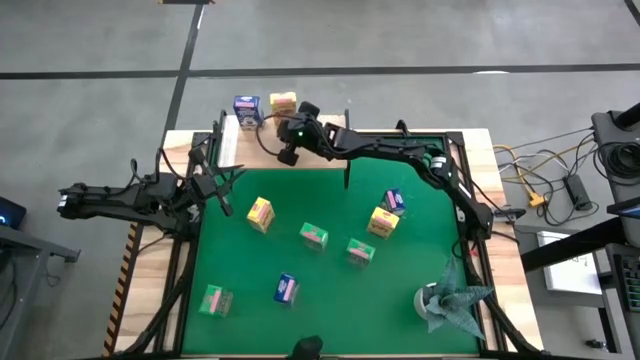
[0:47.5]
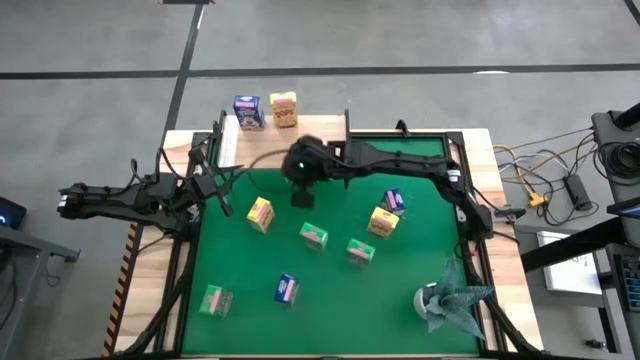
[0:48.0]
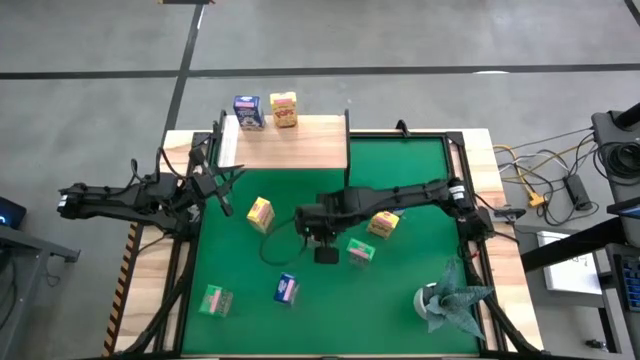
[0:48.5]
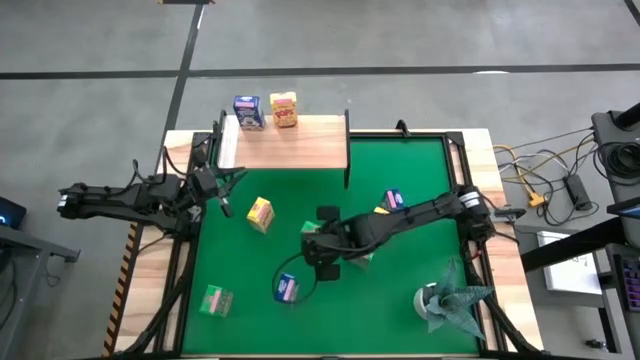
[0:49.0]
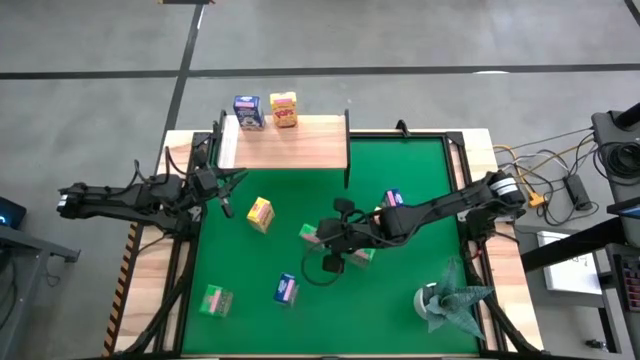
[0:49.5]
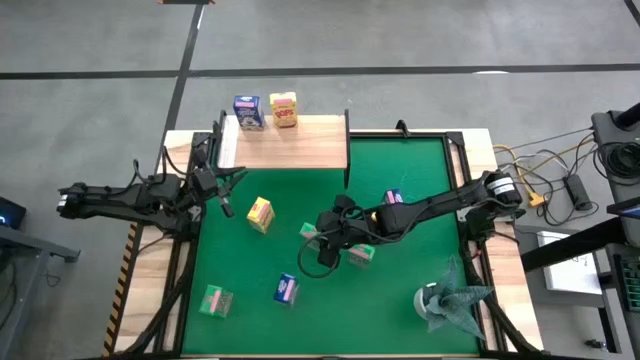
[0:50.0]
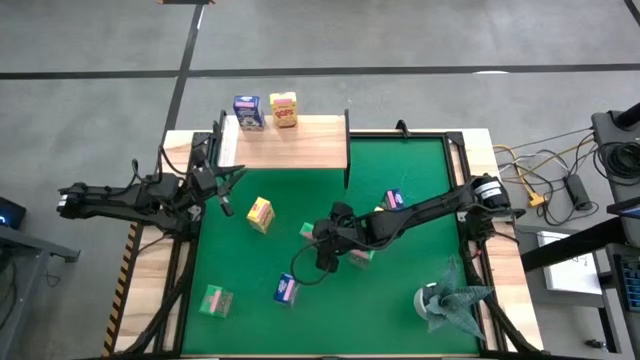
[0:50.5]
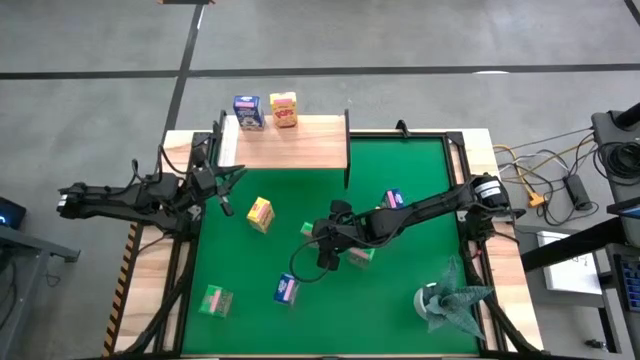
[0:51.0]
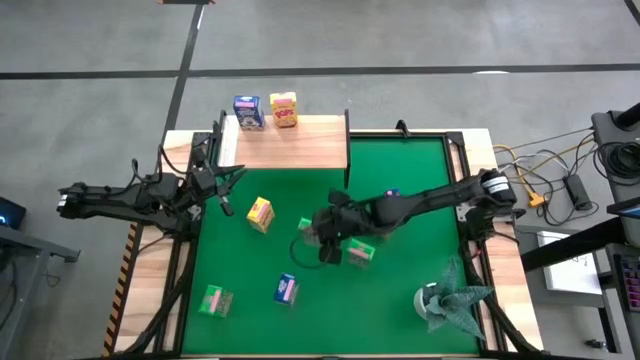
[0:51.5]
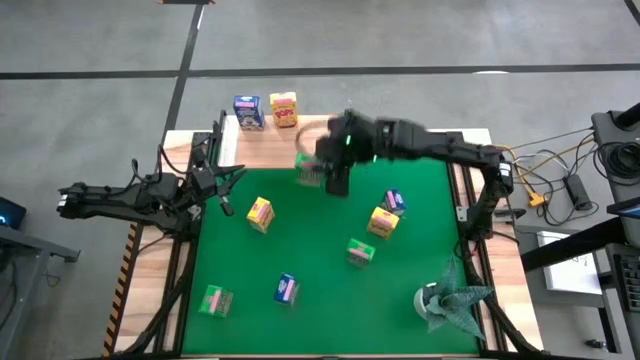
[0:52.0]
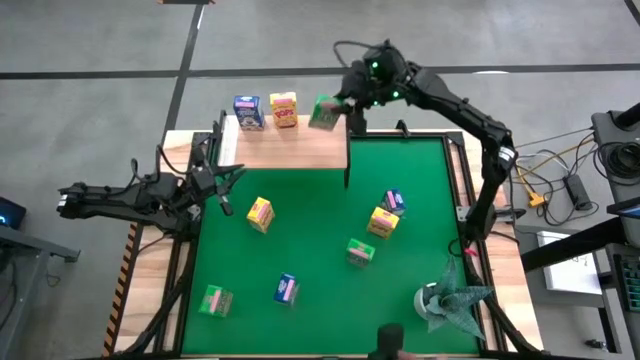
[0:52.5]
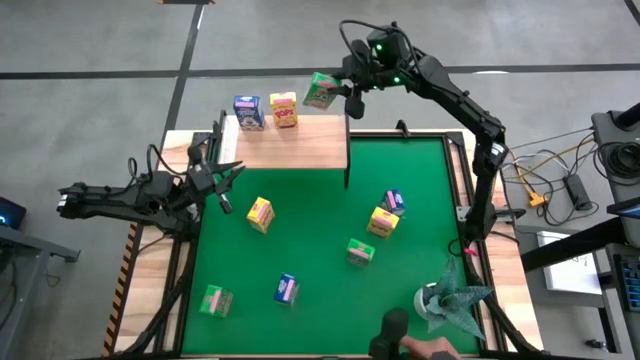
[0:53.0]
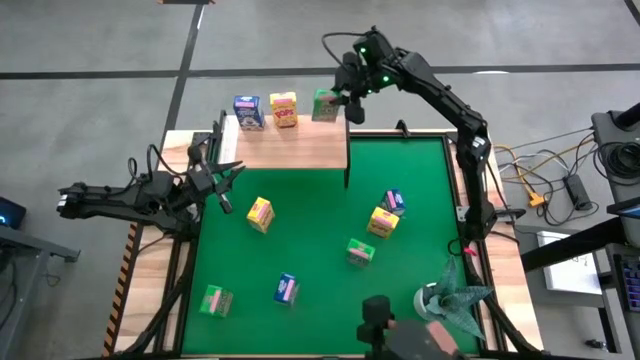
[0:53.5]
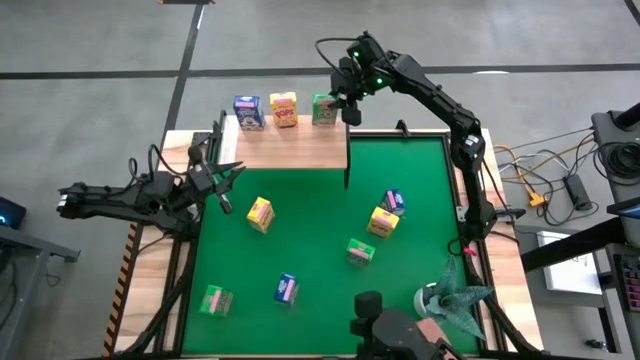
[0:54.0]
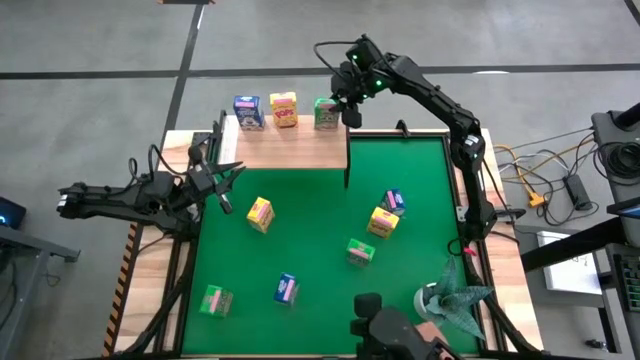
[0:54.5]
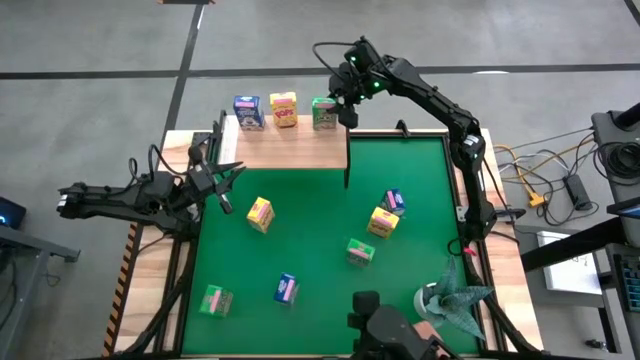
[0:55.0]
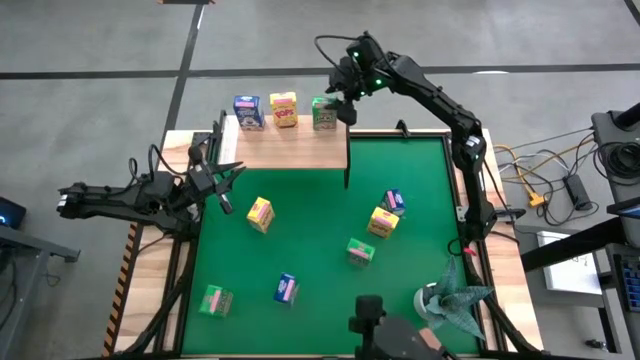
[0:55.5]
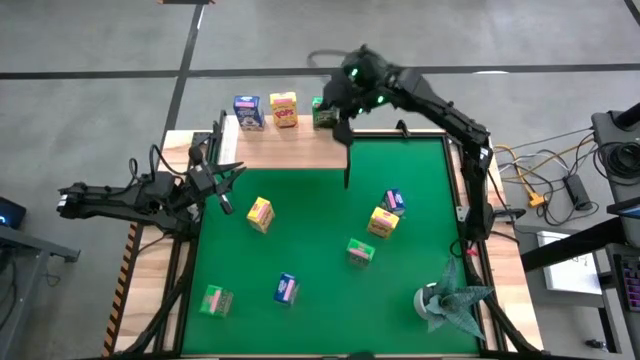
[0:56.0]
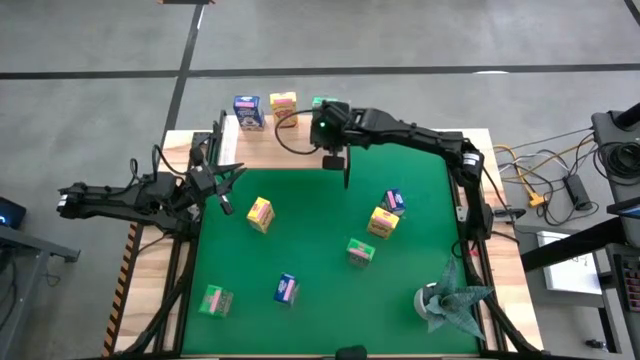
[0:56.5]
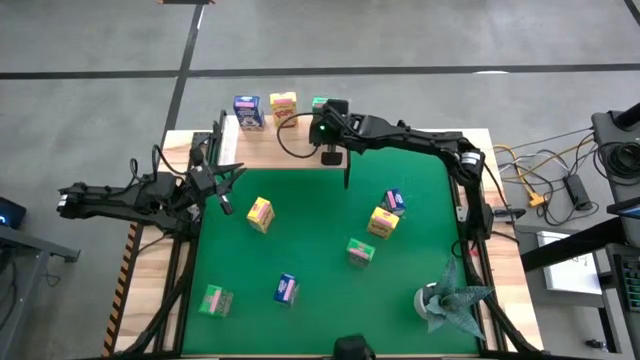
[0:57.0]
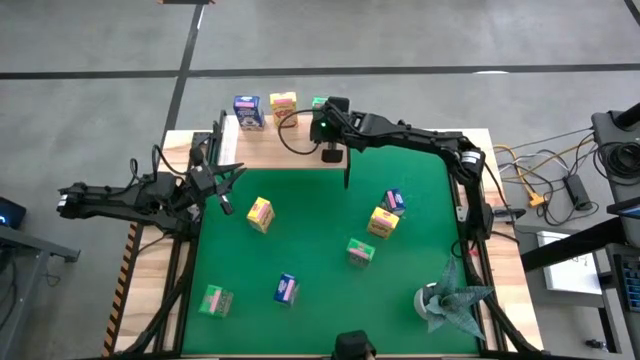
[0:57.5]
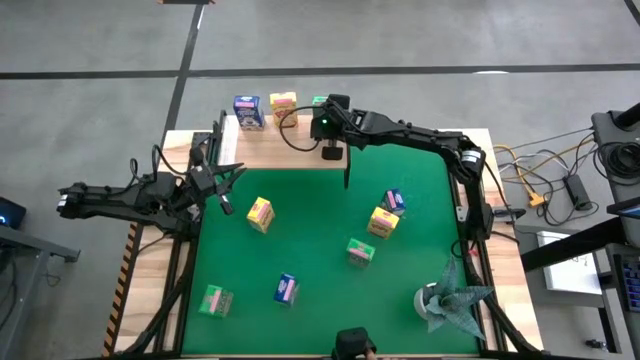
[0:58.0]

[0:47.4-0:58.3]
Task: Stack cereal on shelf
Put top right green cereal box on the shelf

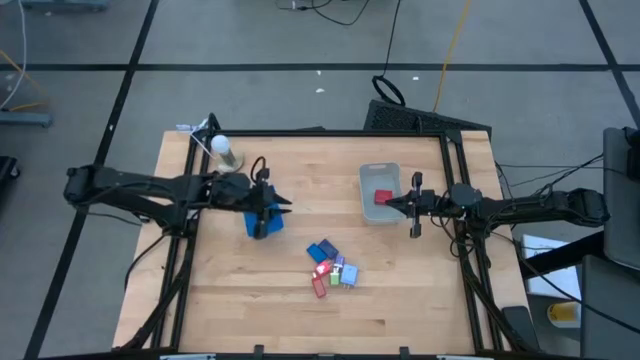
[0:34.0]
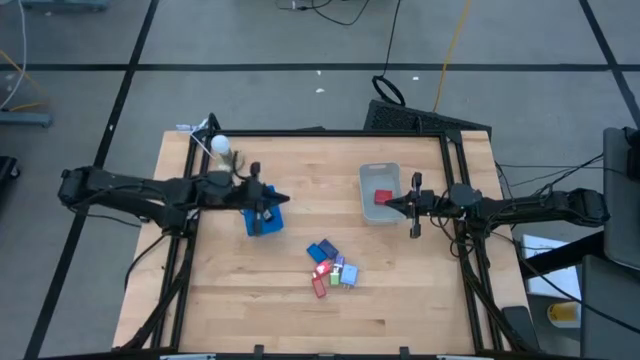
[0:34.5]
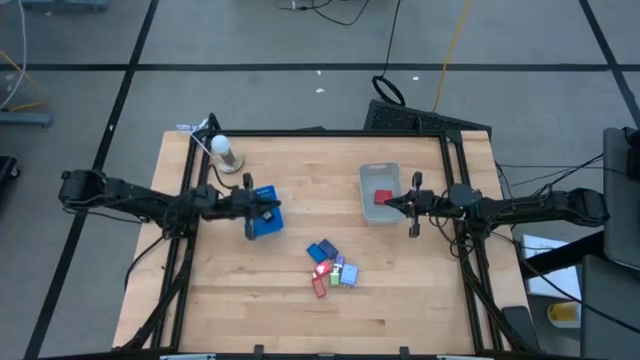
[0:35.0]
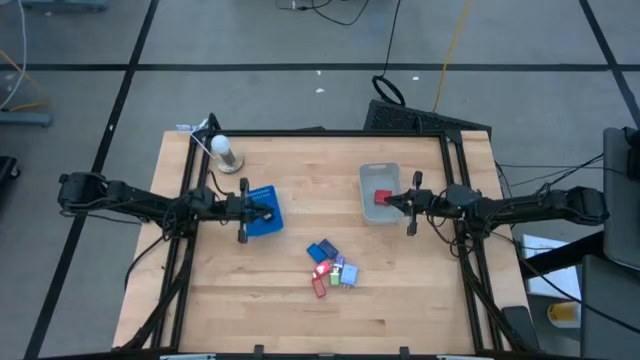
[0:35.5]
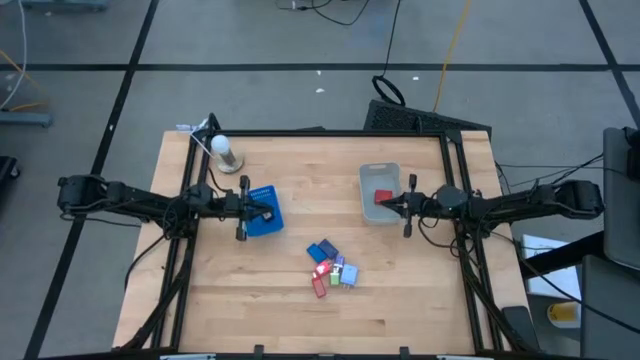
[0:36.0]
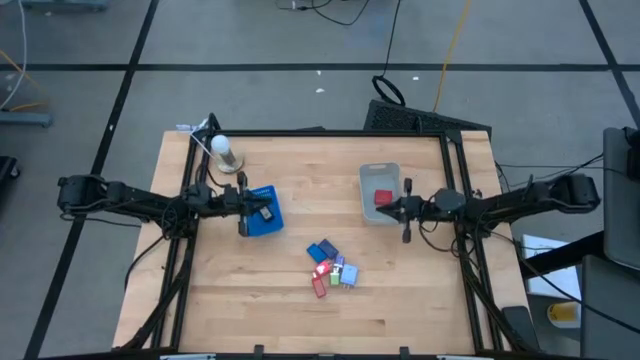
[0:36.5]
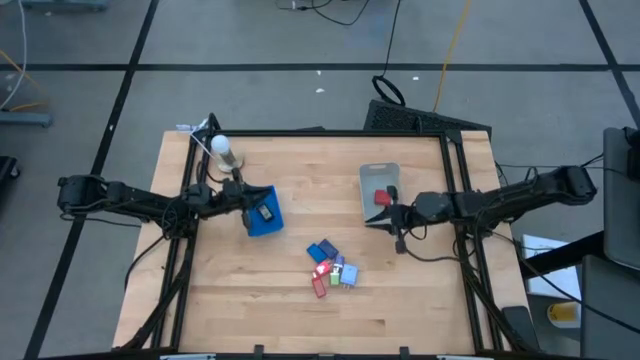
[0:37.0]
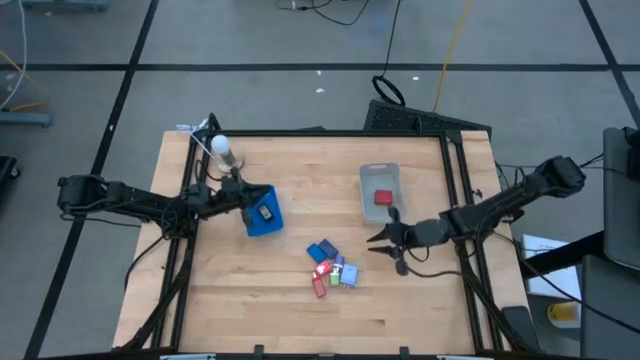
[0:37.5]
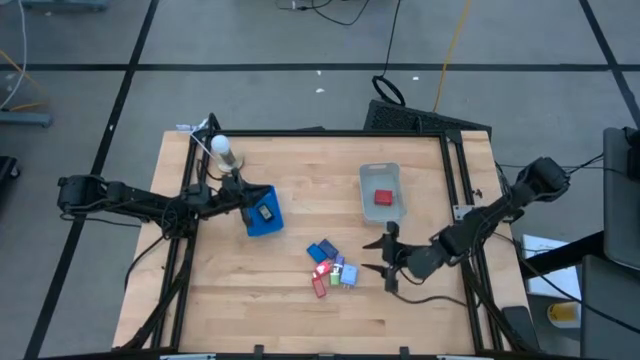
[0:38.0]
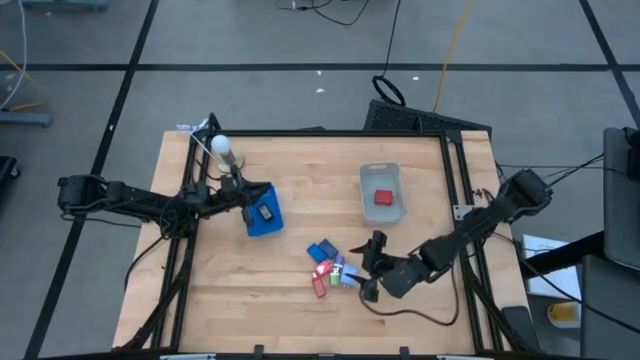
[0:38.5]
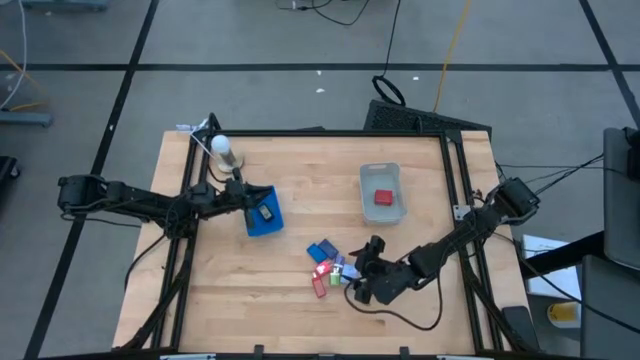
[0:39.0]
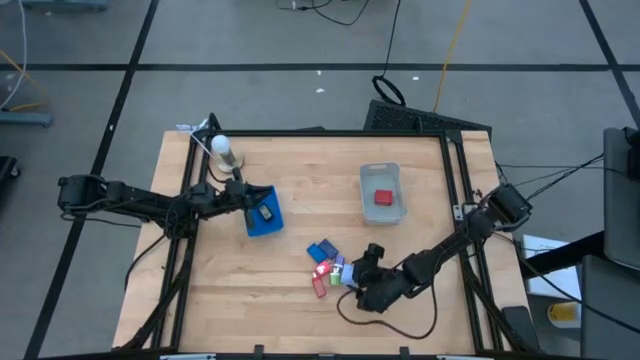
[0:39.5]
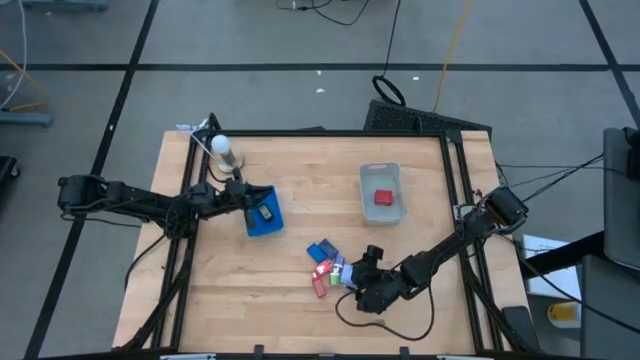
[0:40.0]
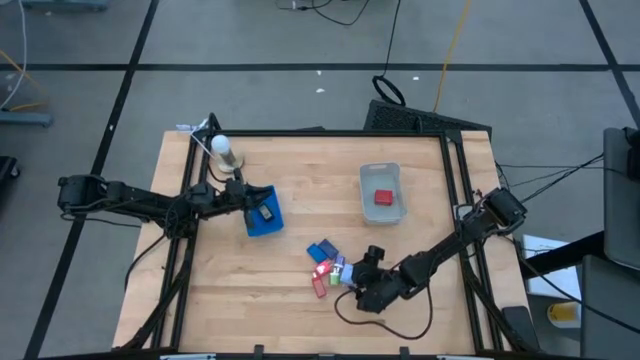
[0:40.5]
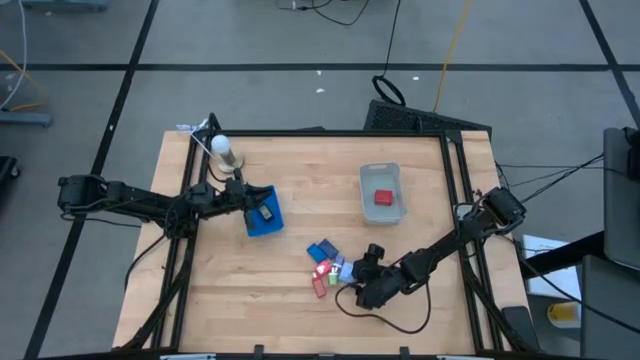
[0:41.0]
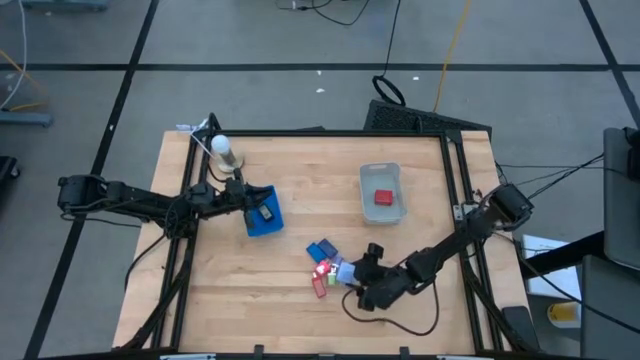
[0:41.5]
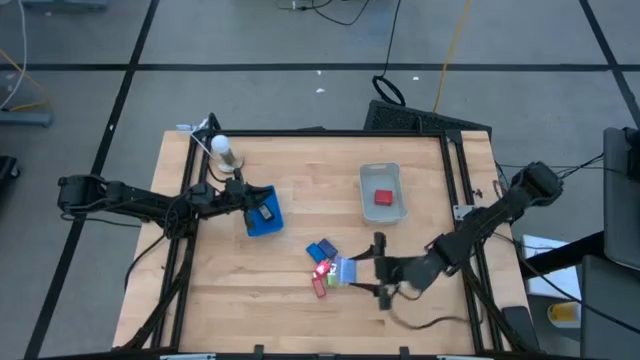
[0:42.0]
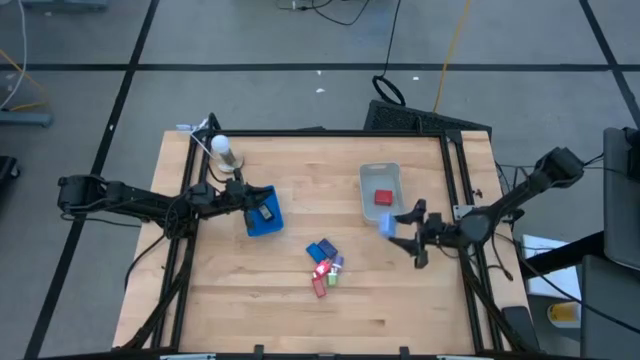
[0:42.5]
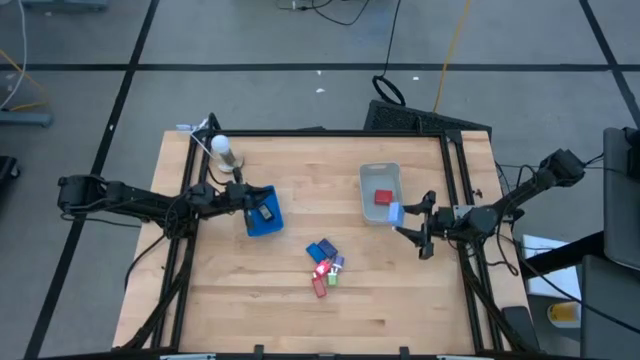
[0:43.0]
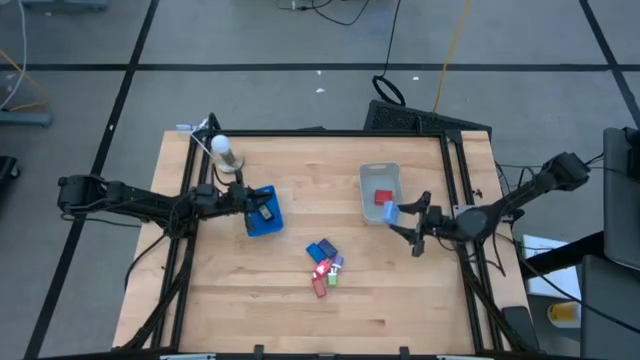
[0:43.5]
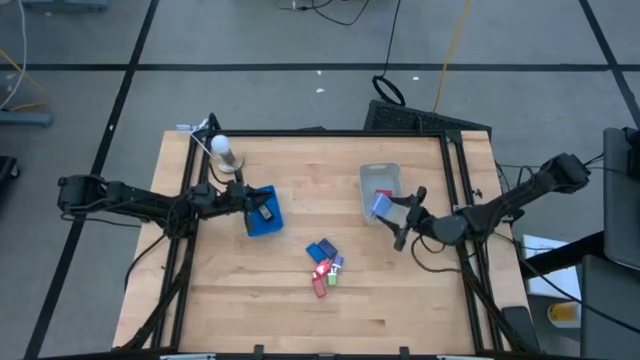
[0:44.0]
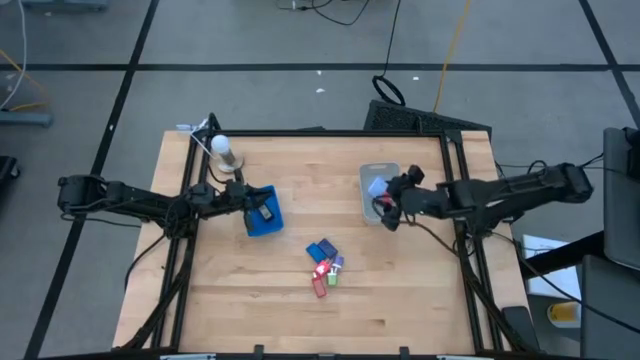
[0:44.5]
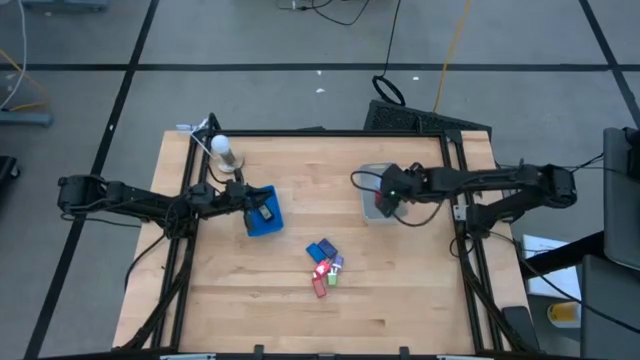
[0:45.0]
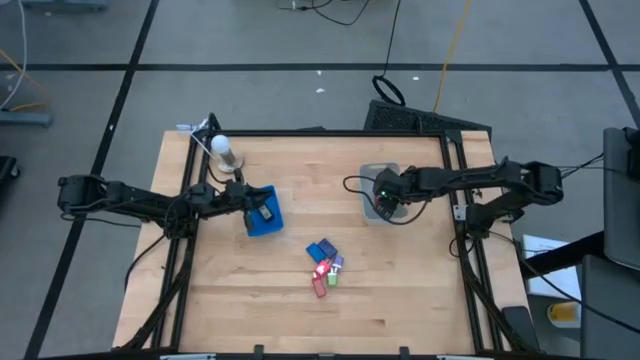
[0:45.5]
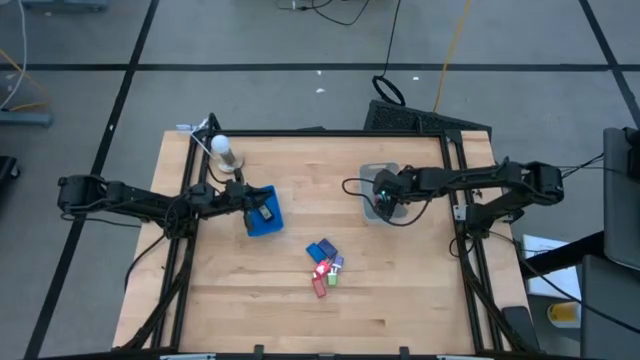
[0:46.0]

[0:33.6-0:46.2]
Task: Pick & Place Office items
Put the light blue charger adapter into the grey bin
